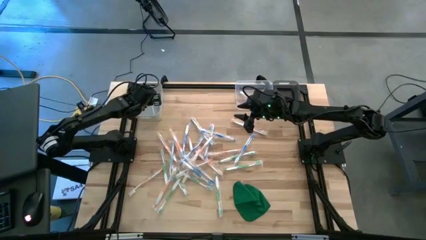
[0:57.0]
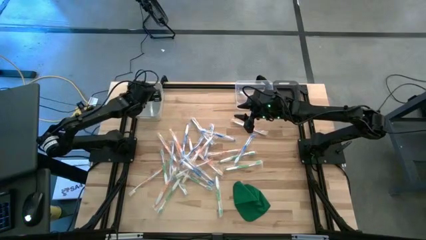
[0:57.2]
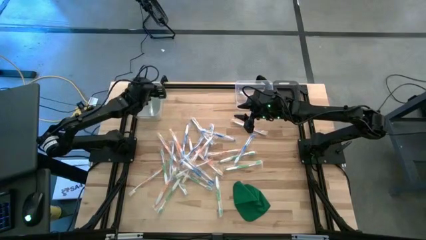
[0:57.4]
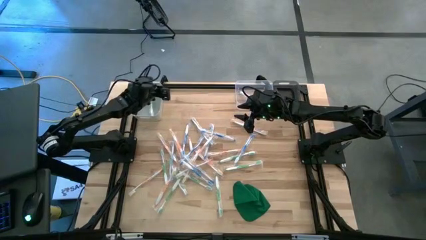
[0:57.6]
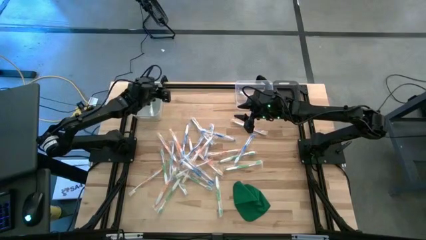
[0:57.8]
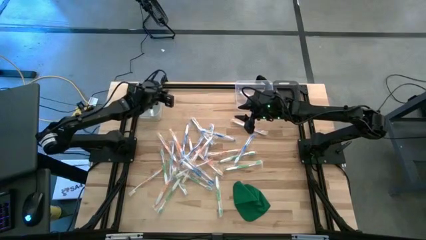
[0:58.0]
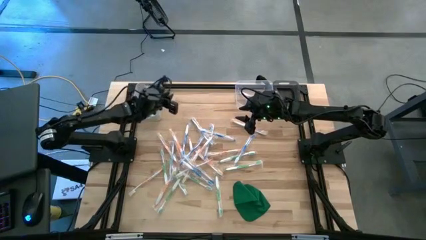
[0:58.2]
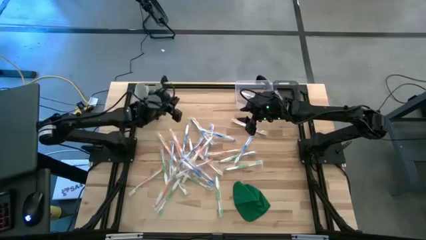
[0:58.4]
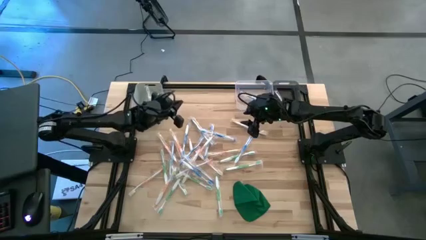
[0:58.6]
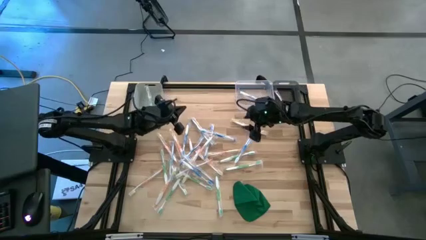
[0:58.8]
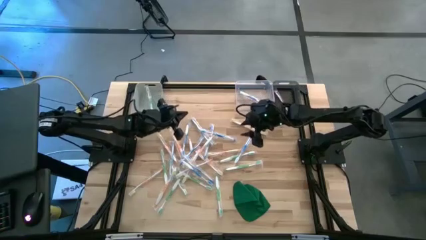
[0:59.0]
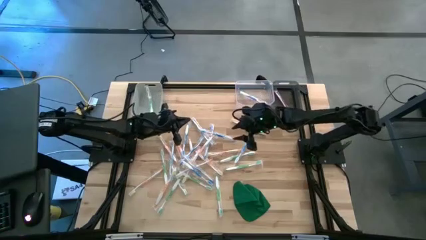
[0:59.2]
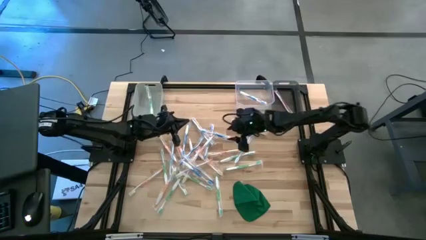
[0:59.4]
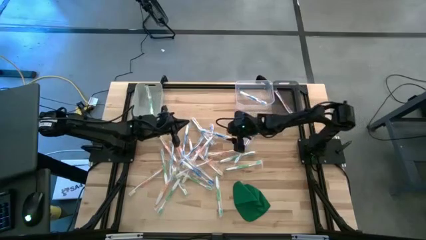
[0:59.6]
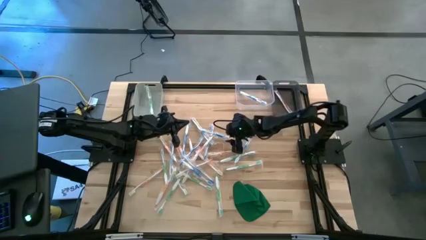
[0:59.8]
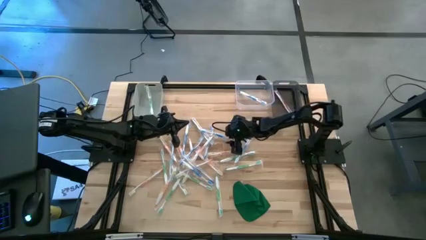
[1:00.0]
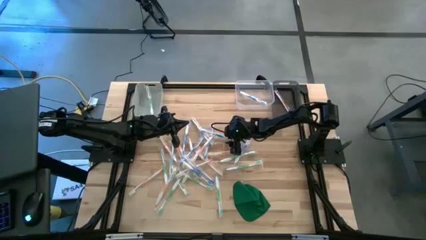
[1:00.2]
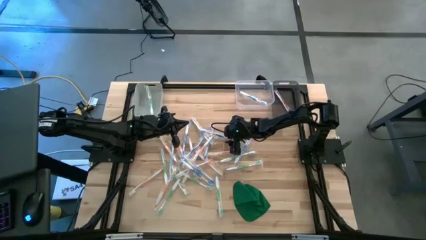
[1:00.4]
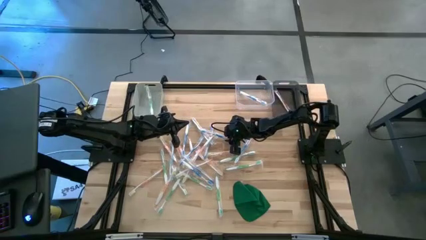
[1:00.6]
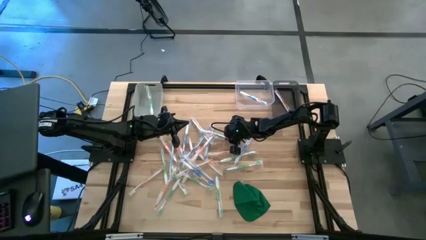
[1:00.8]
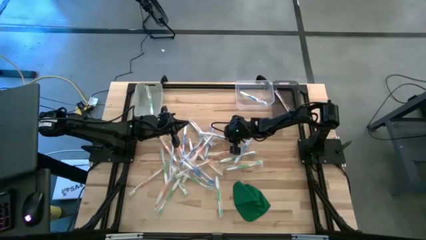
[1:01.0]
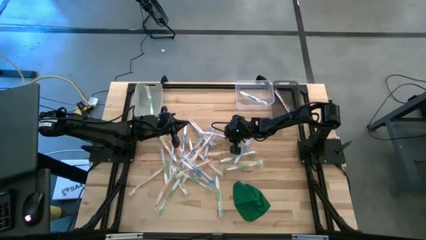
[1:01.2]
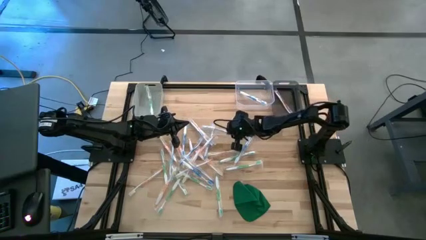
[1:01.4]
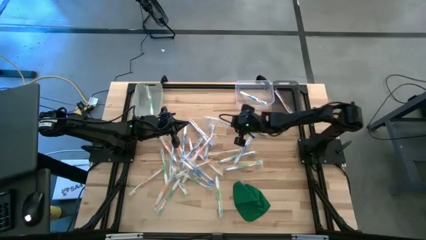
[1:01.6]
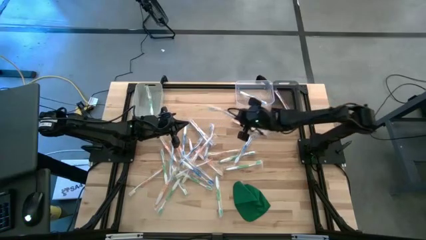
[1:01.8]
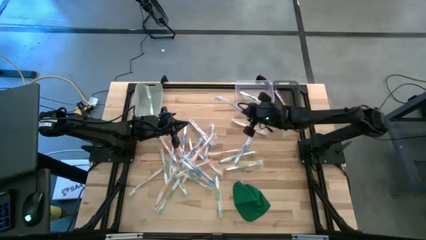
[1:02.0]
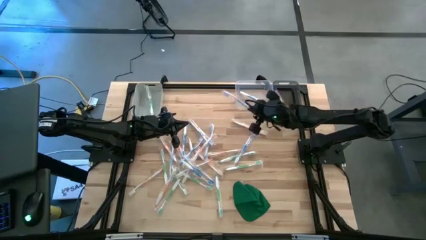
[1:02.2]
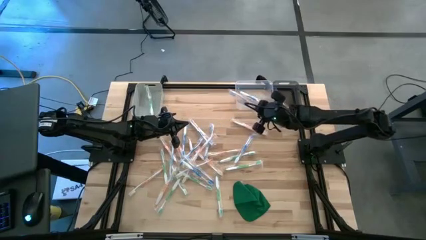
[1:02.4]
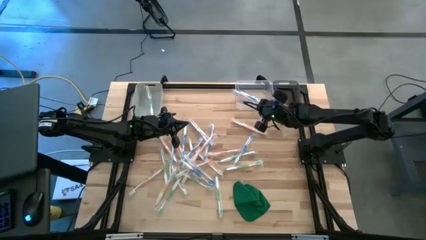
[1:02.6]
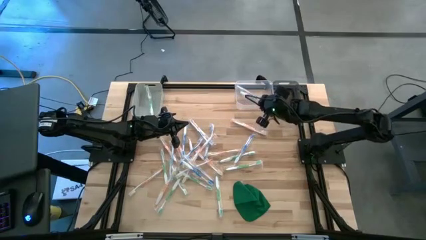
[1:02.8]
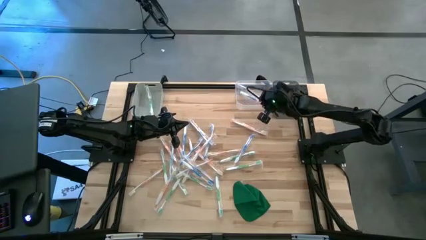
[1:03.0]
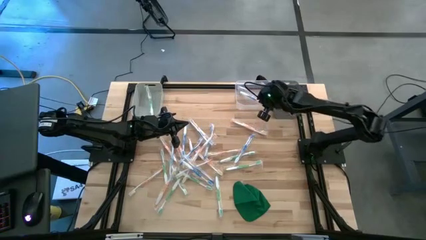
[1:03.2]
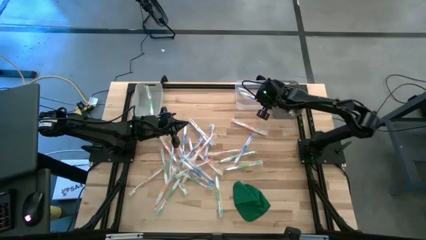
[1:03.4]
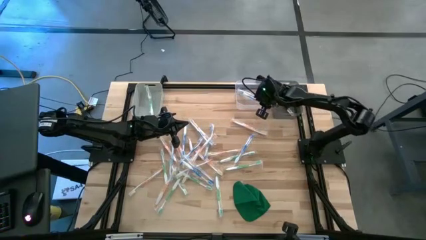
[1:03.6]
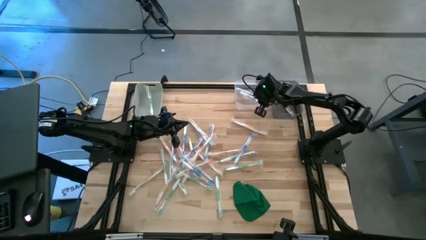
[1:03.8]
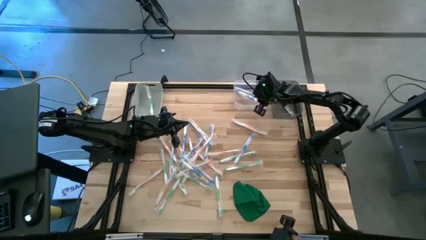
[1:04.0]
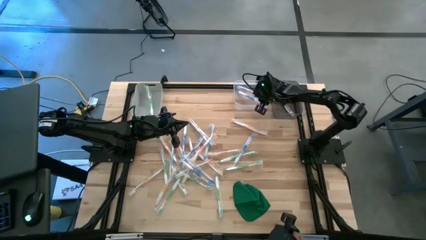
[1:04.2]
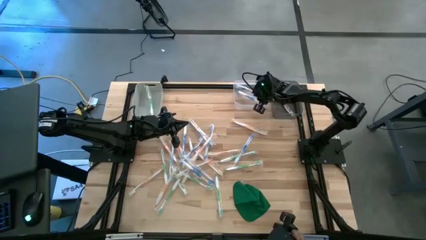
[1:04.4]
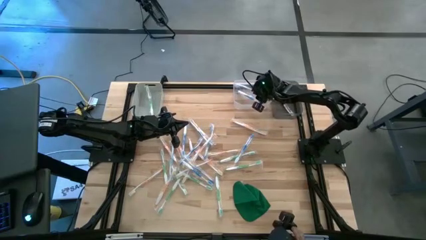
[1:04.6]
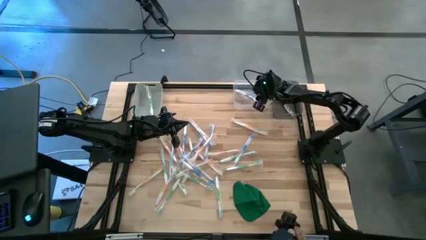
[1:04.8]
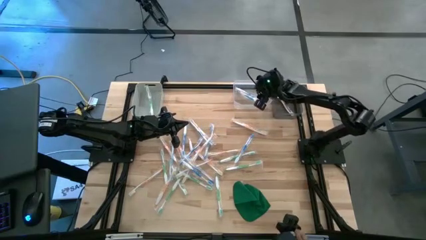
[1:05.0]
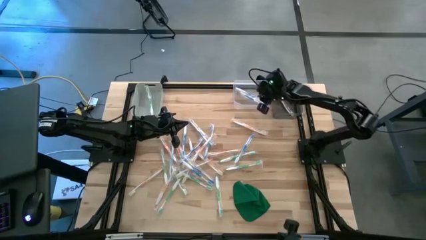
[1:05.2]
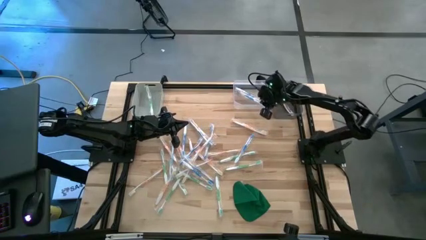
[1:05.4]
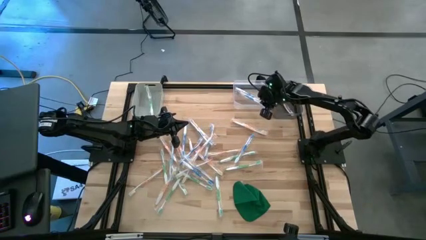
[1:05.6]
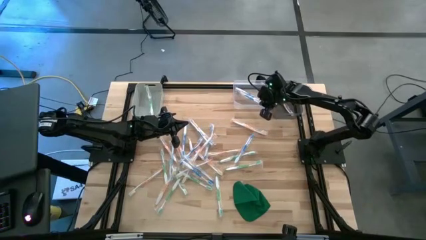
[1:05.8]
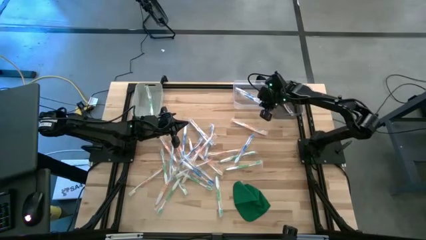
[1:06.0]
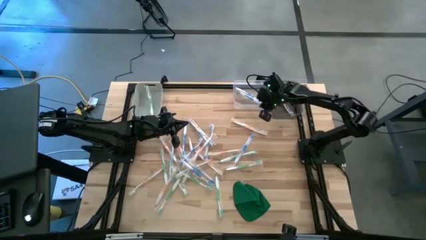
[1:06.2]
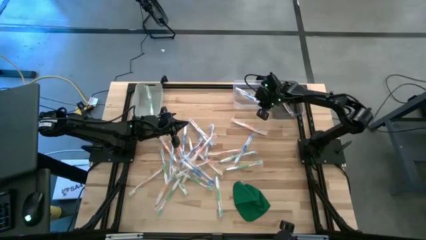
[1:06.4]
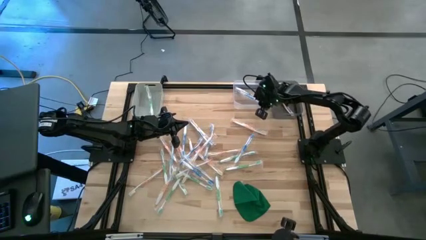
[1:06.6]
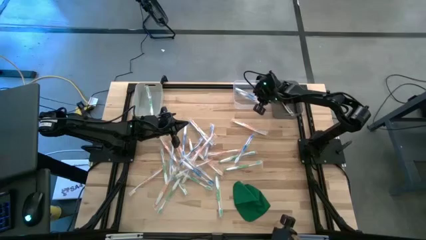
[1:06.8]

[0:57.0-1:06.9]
Task: Pick & Place Toothbrushes
Put the blue toothbrush into the transparent bin
